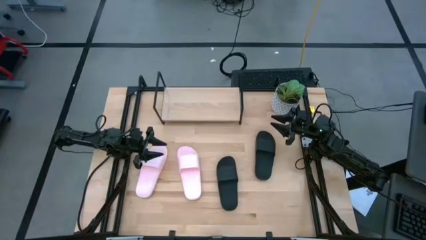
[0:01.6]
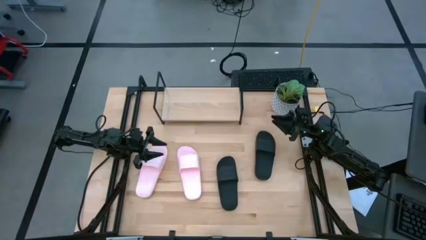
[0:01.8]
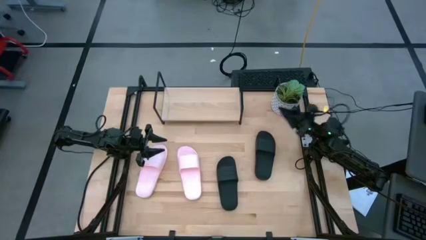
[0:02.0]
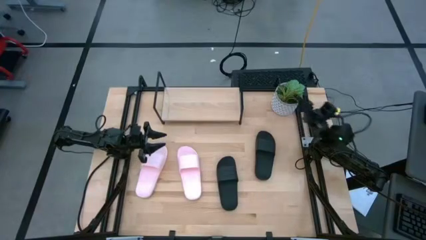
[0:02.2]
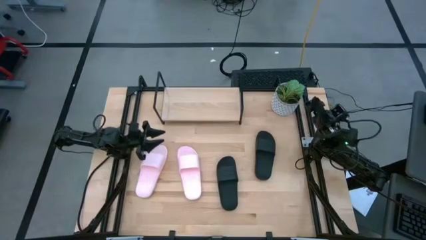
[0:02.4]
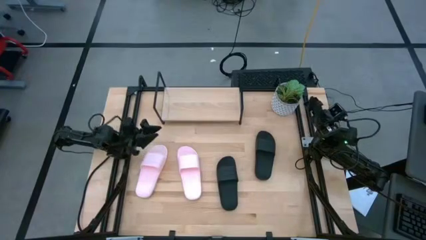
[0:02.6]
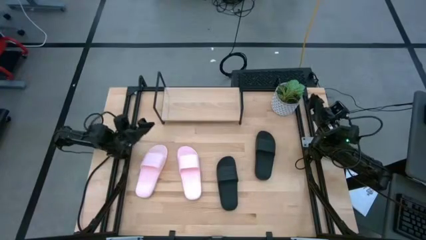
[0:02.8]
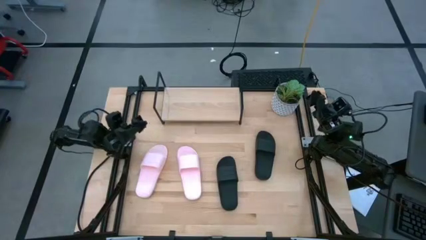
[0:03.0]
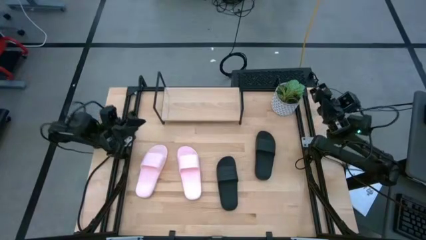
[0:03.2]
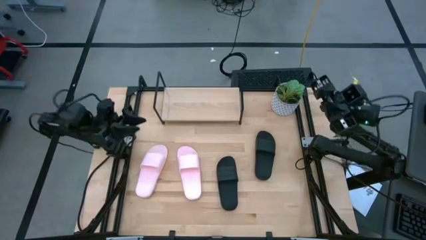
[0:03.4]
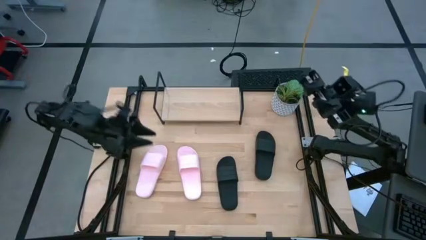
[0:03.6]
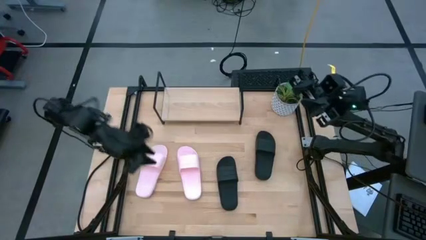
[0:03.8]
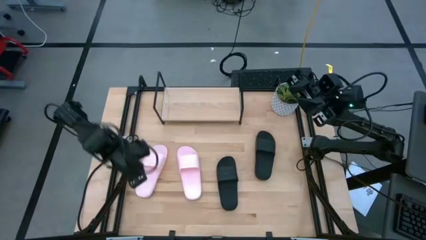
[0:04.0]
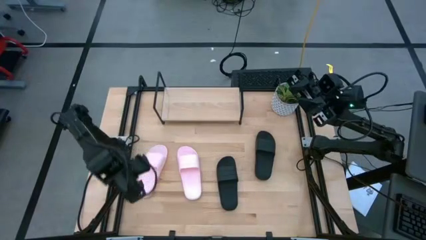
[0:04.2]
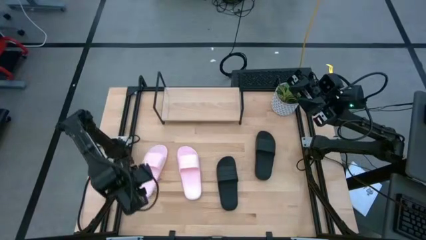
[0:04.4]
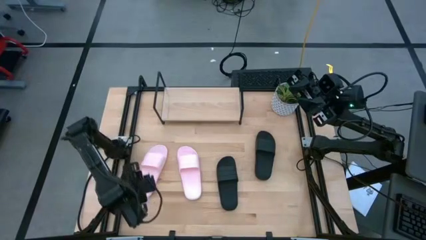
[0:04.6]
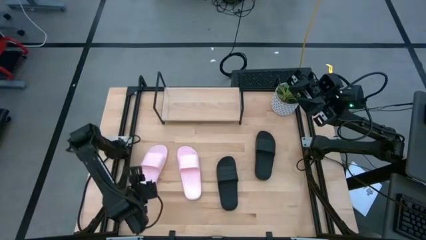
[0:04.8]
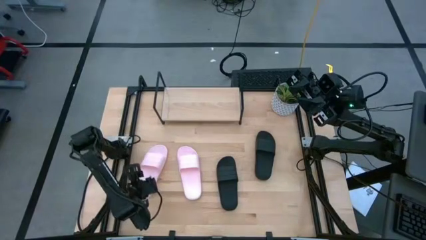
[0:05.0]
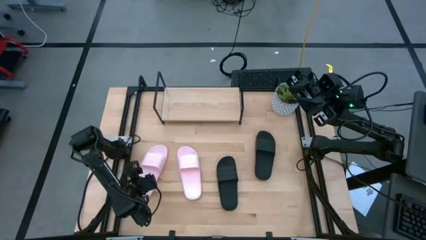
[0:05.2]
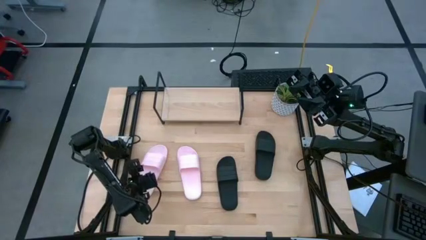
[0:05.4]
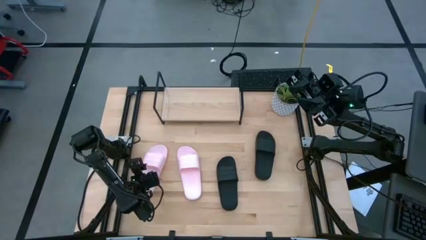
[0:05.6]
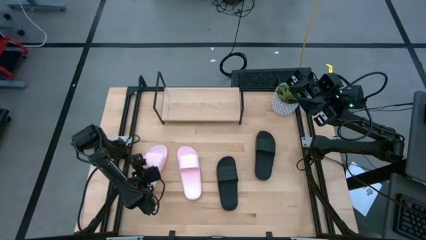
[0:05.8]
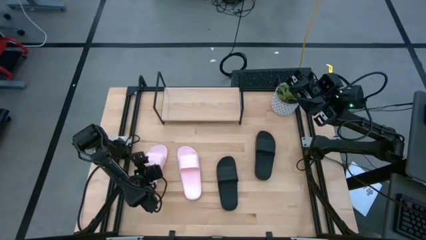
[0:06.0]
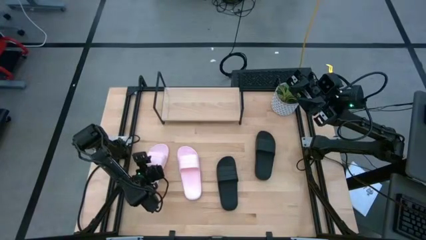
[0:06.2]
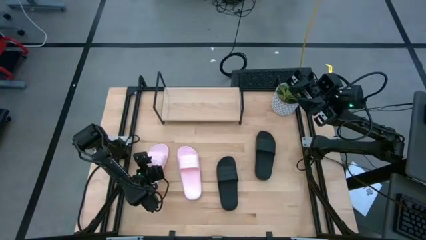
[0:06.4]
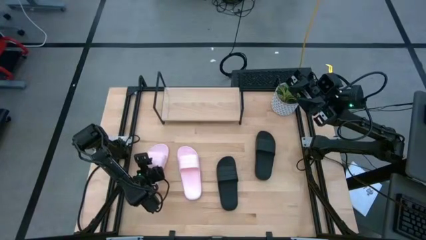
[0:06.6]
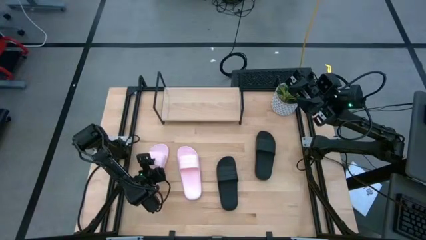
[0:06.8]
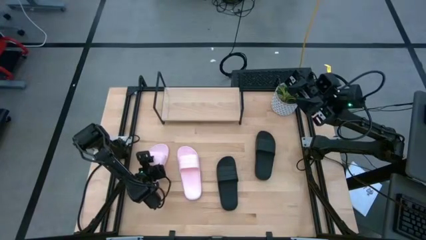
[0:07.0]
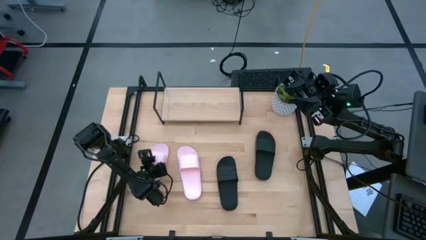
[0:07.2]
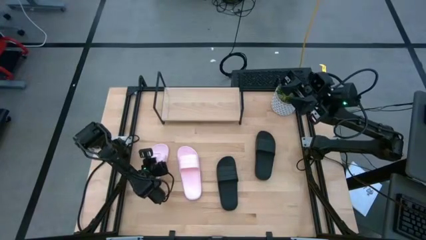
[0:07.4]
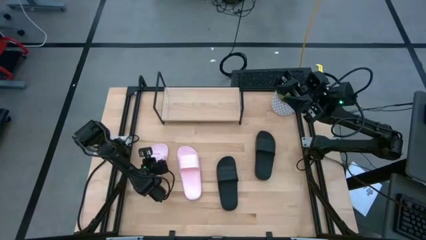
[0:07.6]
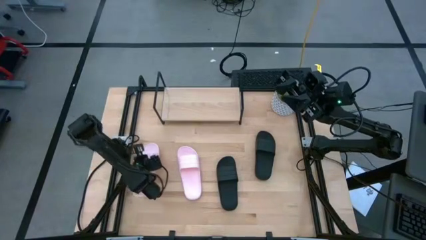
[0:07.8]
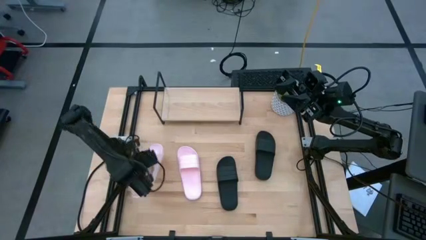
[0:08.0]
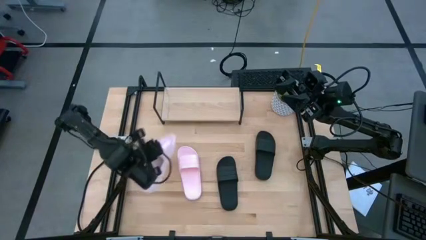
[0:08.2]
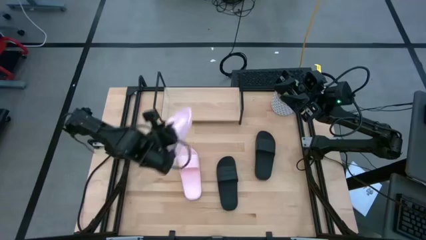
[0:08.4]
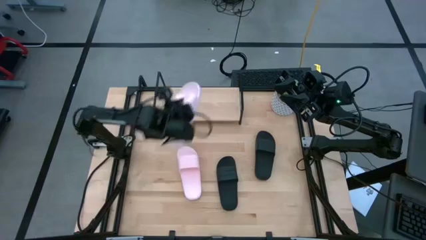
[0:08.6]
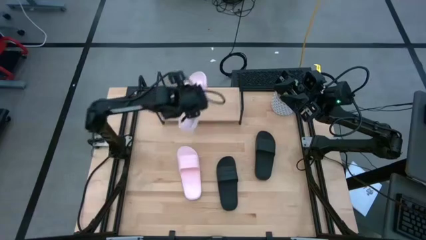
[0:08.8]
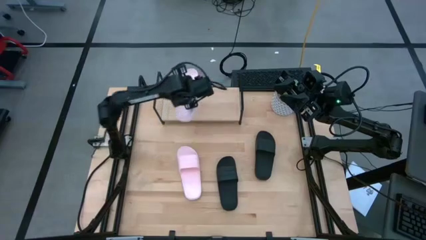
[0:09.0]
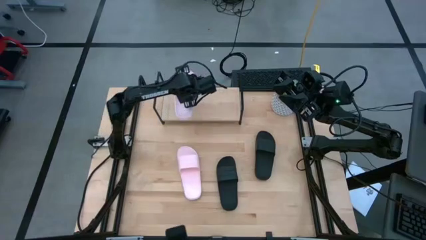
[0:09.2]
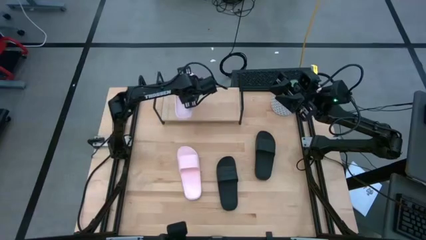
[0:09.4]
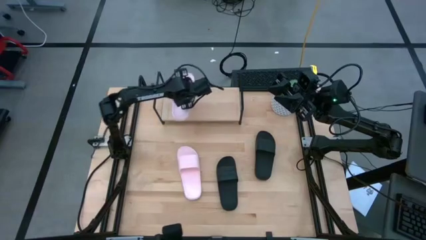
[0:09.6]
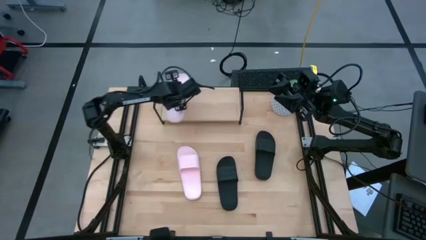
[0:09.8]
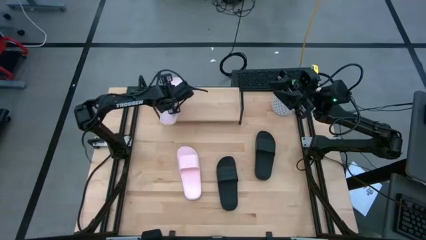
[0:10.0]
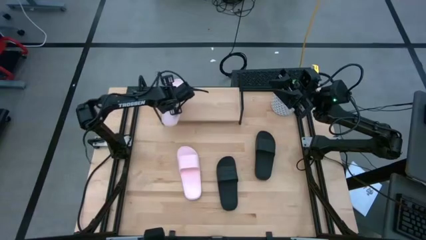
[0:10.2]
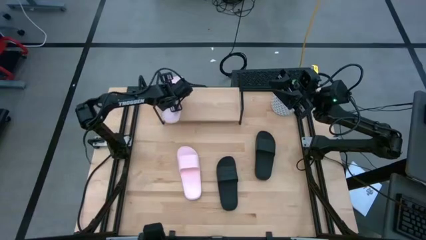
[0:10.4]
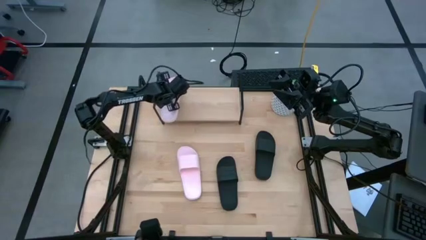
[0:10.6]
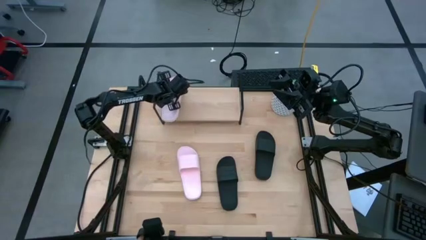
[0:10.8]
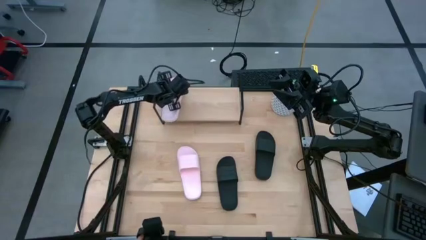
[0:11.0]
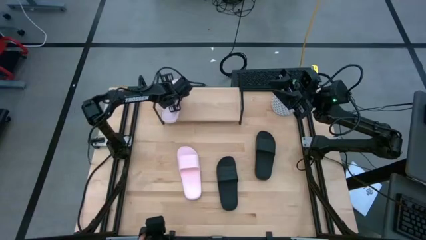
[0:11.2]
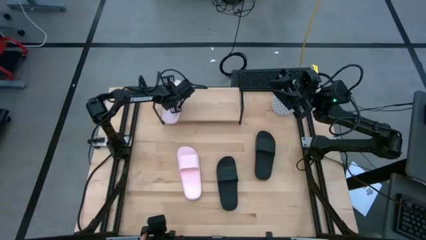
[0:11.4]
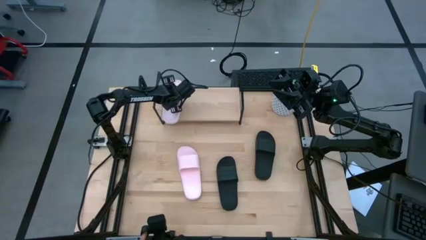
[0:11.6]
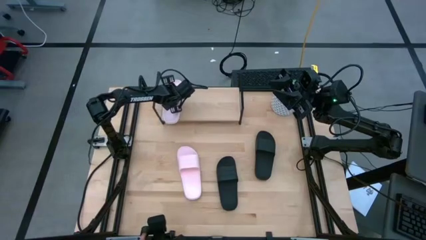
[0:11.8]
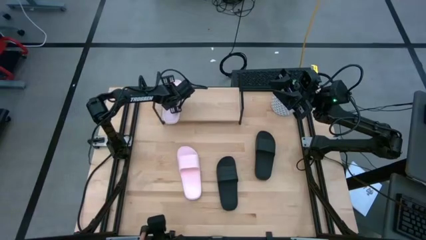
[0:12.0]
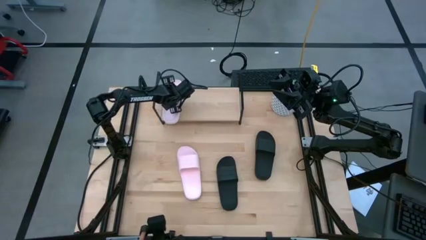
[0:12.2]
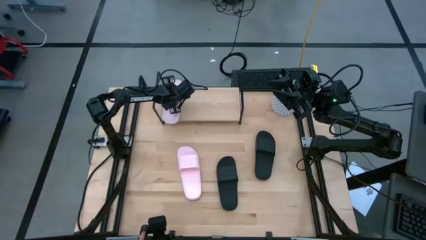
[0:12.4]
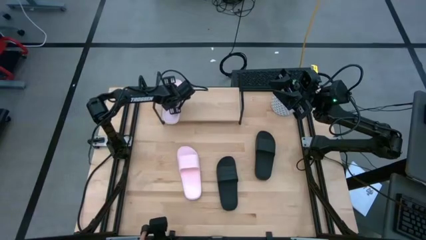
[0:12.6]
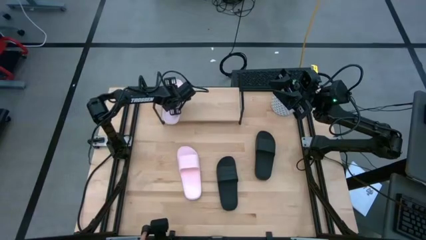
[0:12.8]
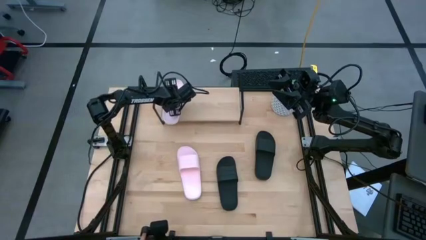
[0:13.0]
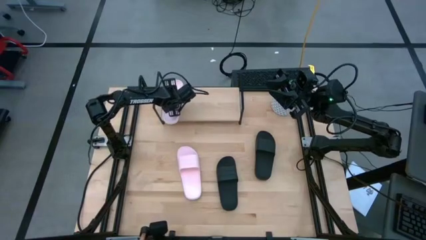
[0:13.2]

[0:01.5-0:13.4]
Task: Pick and place slides into the shelf
Put the left pink slipper on the shelf
